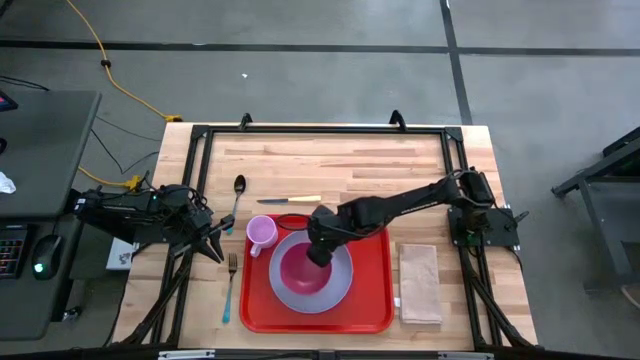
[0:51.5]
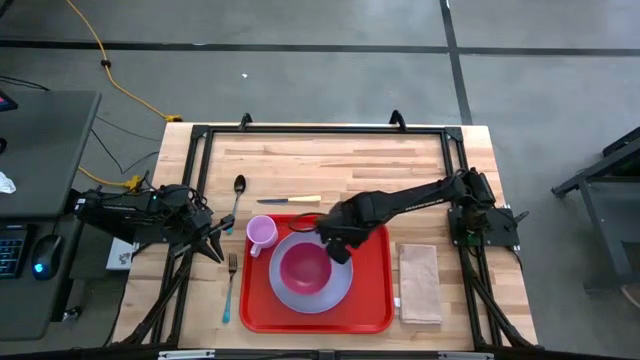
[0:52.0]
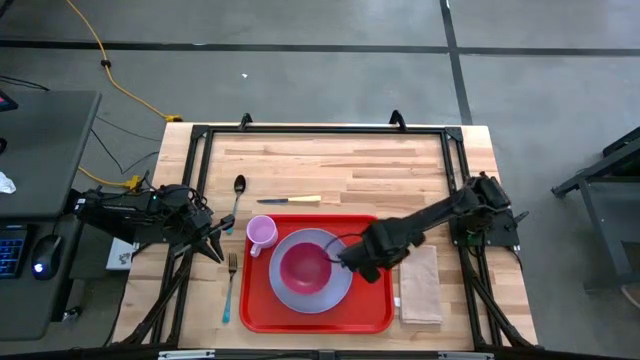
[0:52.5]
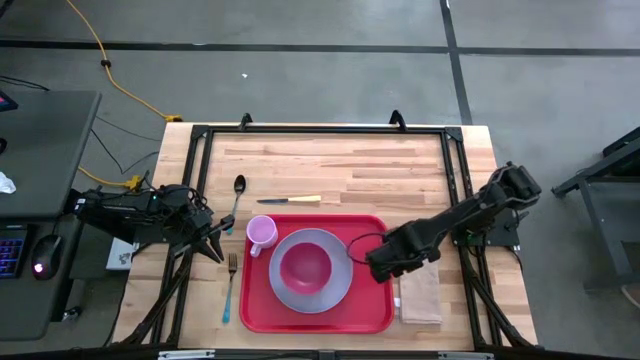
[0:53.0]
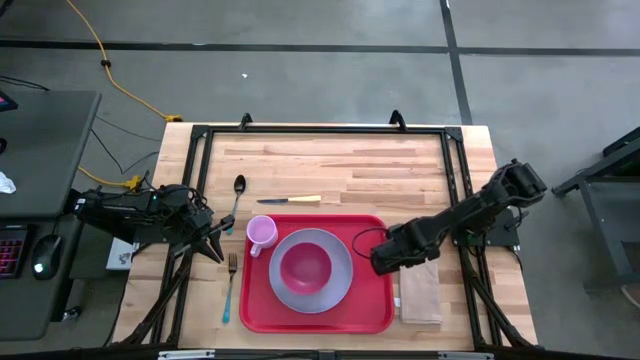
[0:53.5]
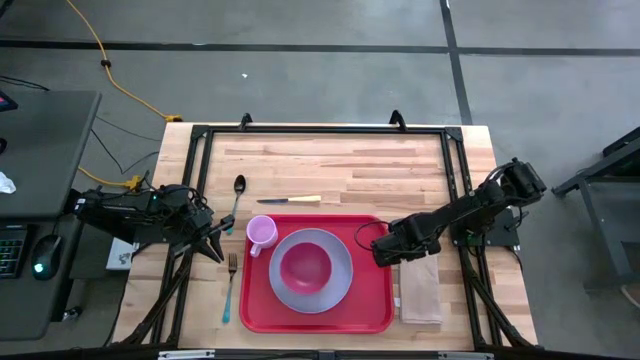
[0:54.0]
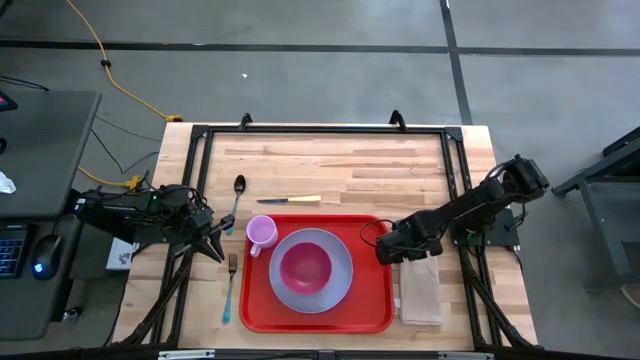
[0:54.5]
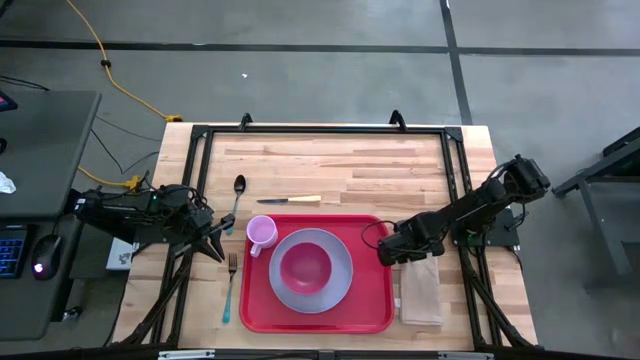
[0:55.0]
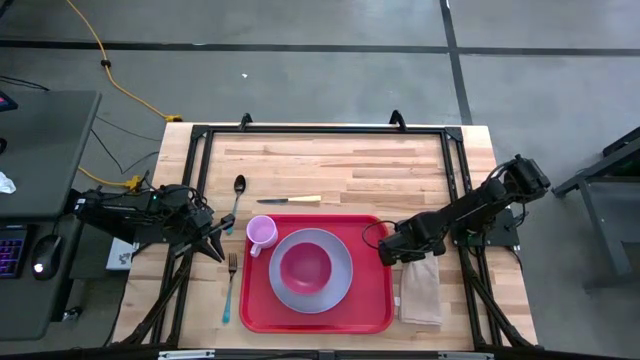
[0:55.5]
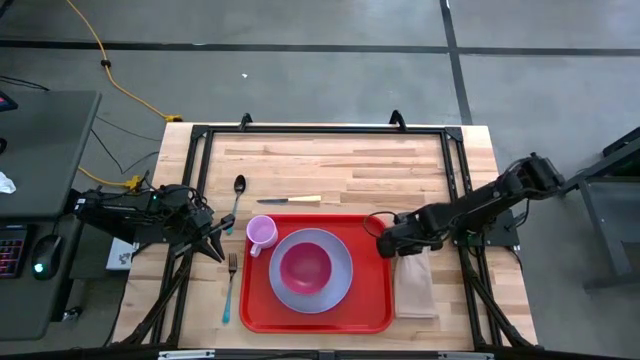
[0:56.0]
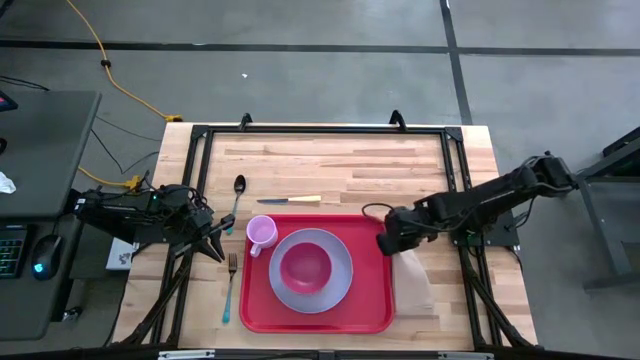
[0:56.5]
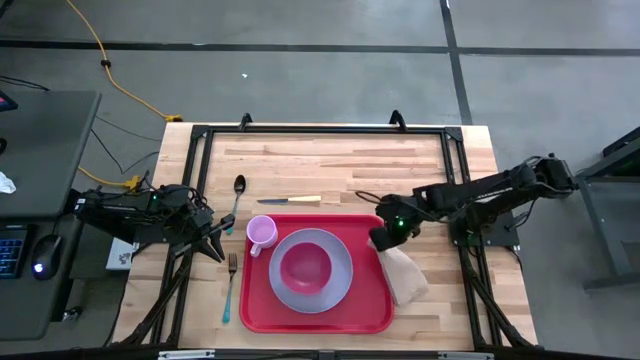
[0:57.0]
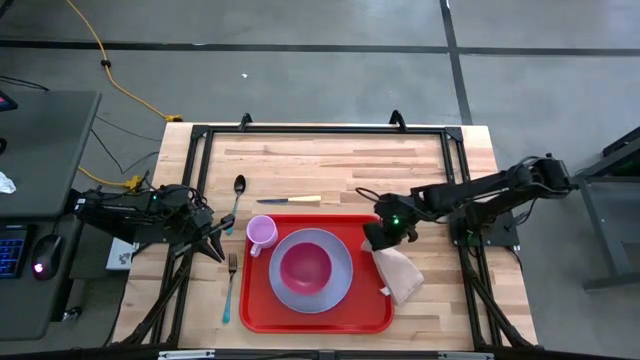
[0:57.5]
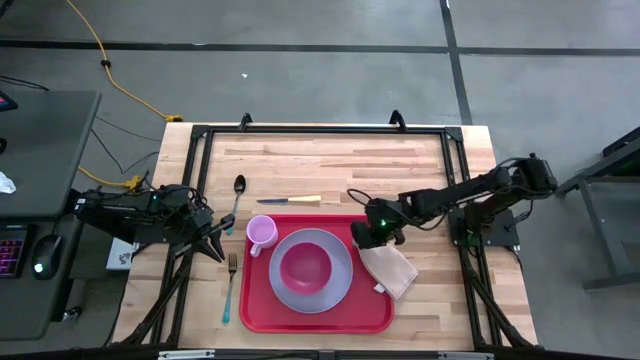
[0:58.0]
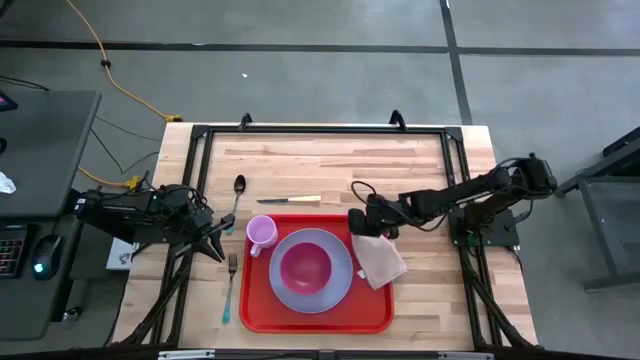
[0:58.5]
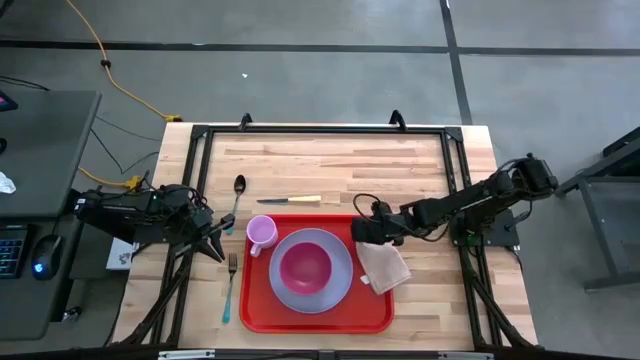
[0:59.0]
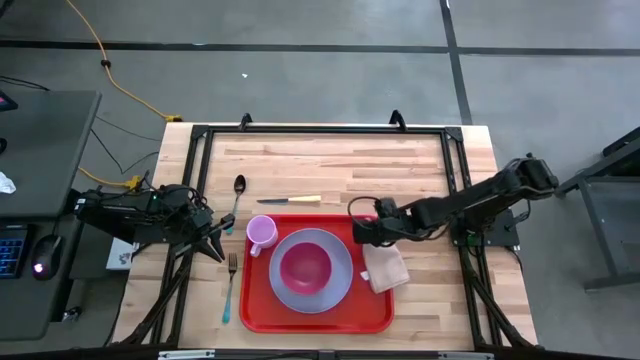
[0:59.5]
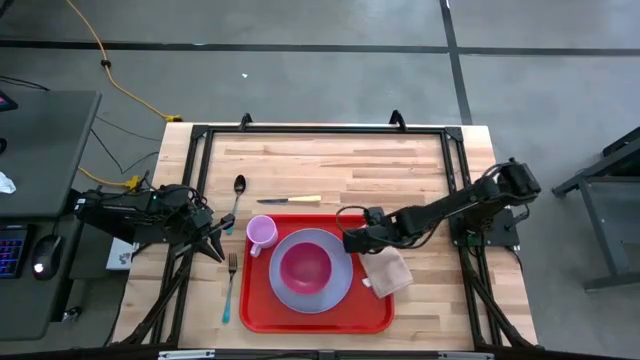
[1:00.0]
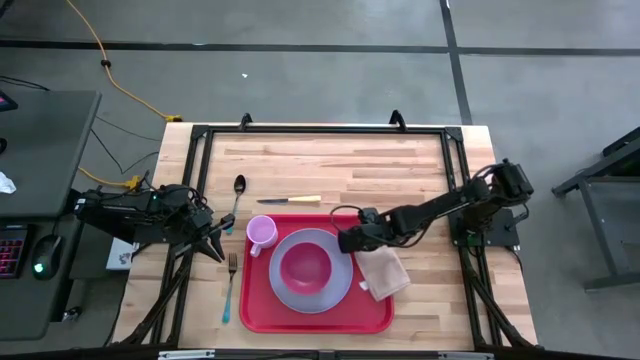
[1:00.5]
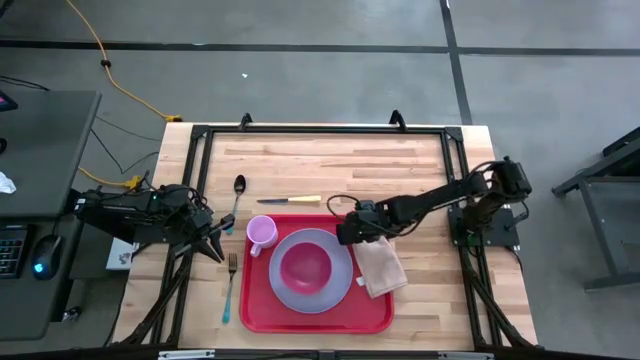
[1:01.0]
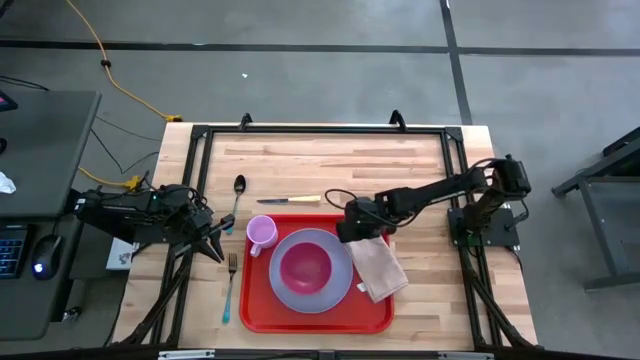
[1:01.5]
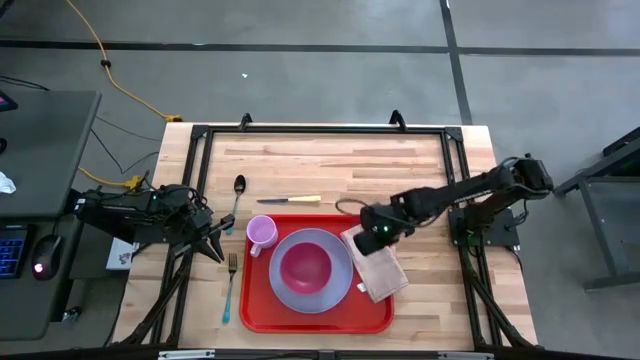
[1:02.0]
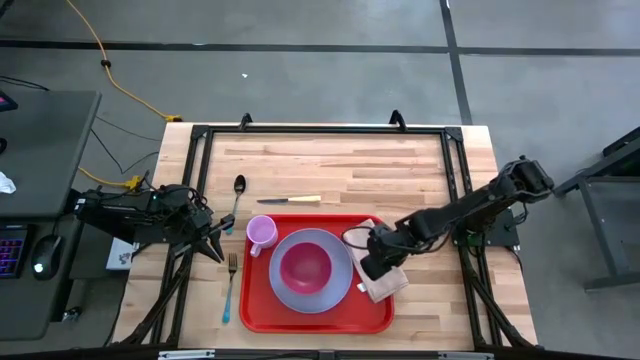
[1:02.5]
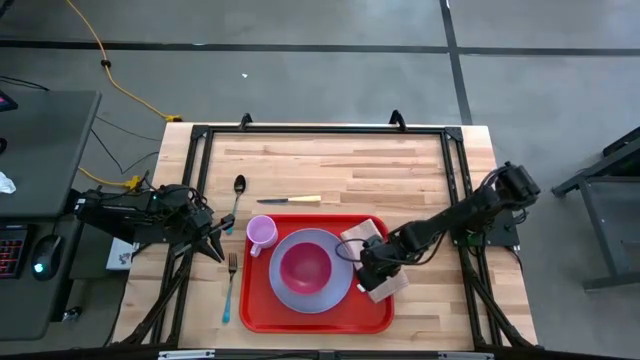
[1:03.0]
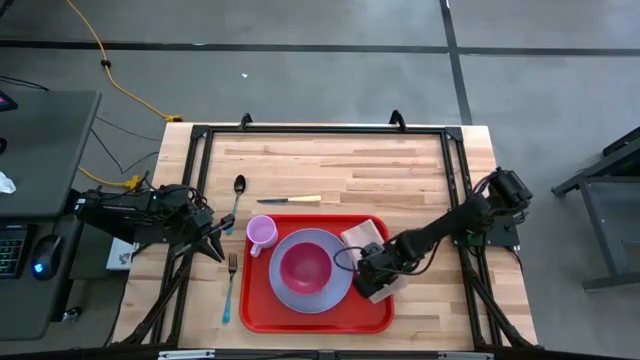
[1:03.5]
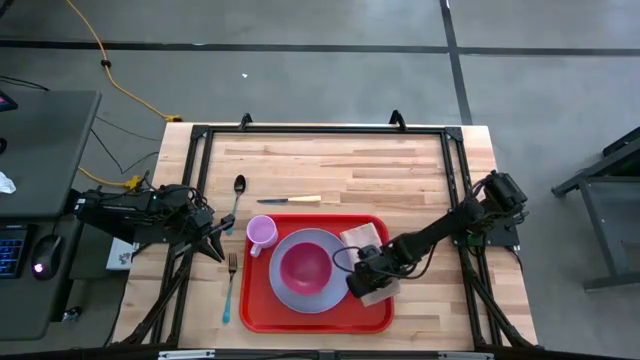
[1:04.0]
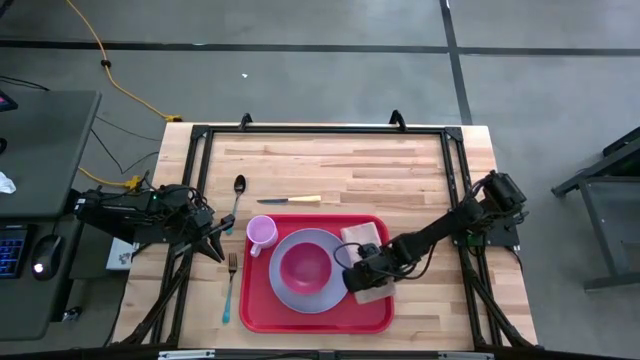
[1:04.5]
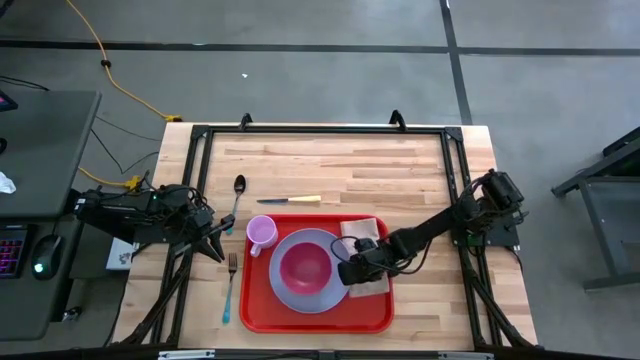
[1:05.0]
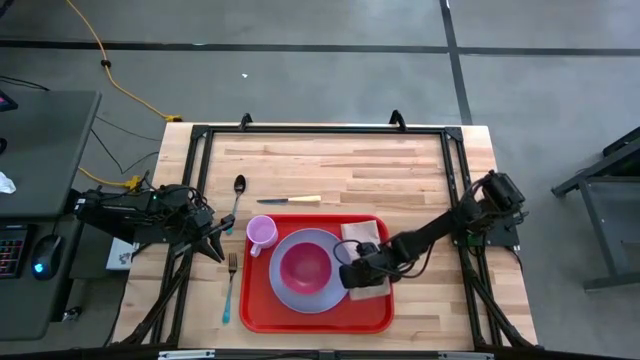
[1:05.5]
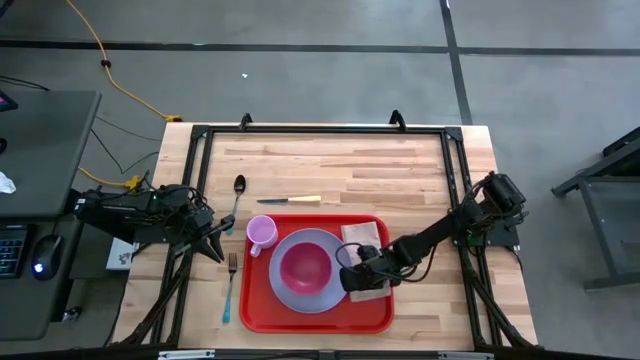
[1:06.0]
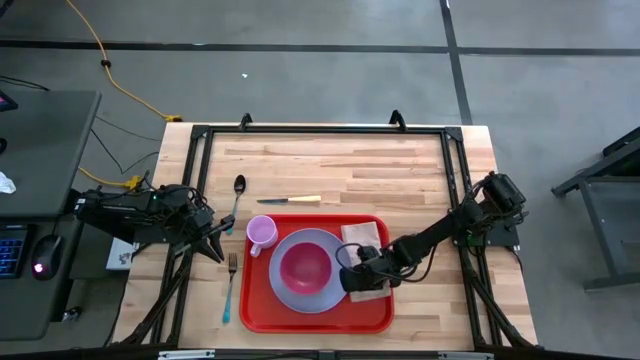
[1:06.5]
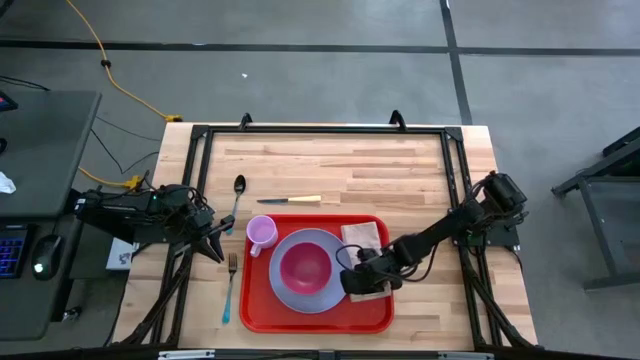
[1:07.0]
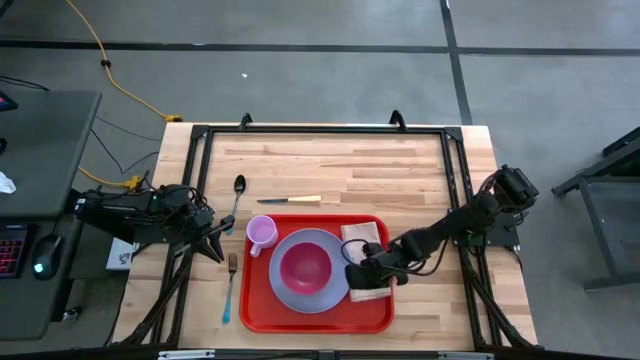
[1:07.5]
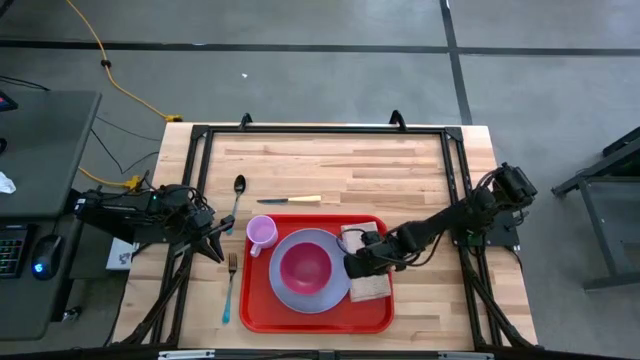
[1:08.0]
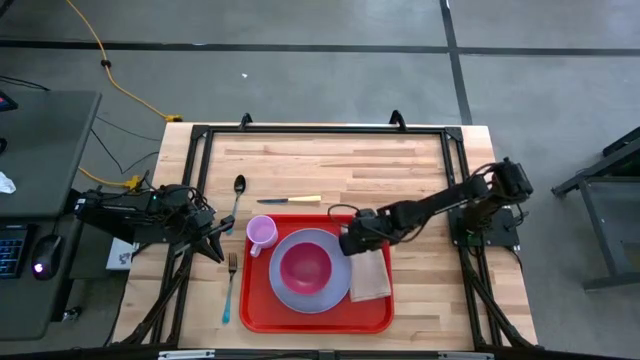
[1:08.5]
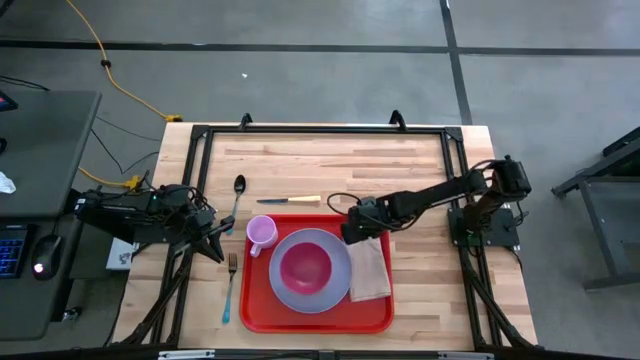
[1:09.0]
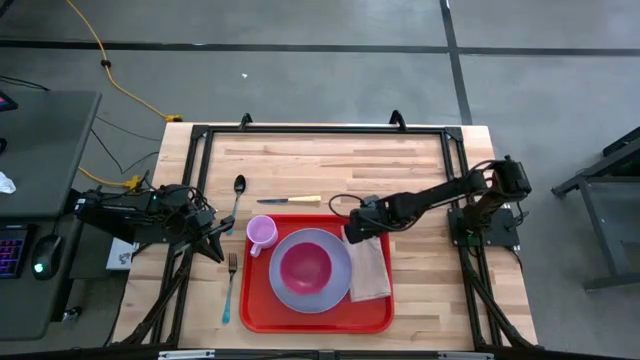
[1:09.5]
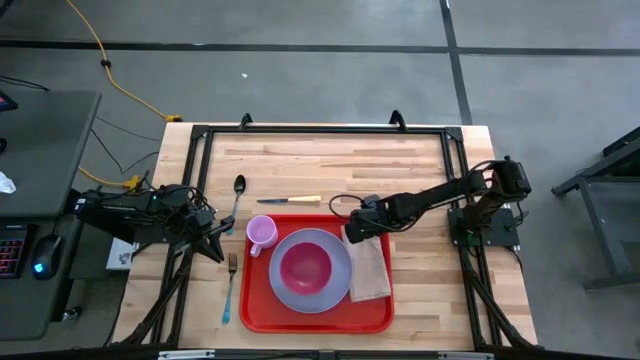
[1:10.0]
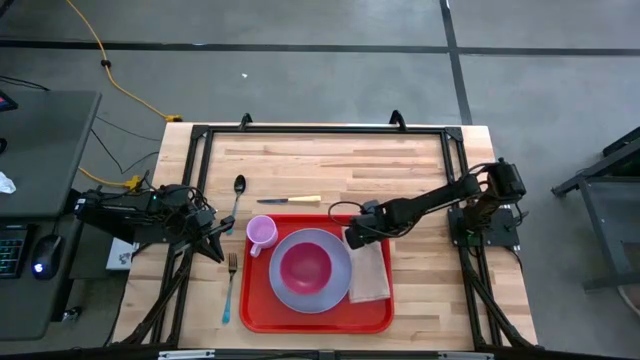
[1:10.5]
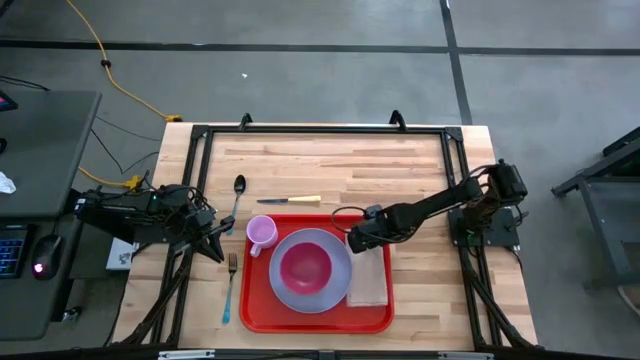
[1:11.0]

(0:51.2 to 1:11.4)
Task: Set up tray
Put the brown napkin to the right of the white plate on the red tray
